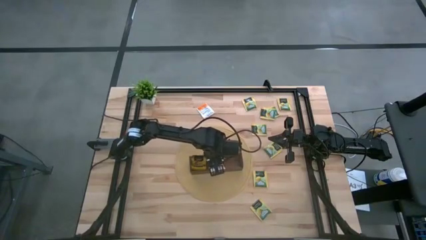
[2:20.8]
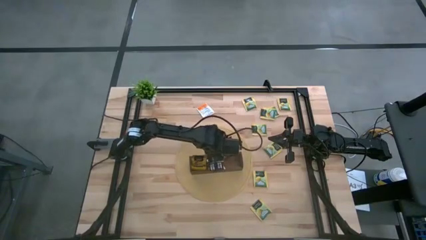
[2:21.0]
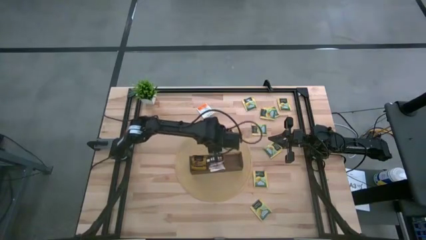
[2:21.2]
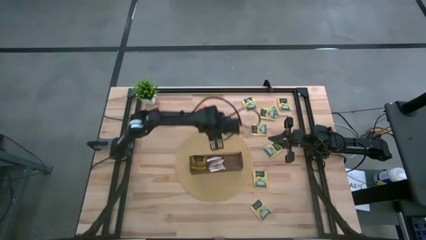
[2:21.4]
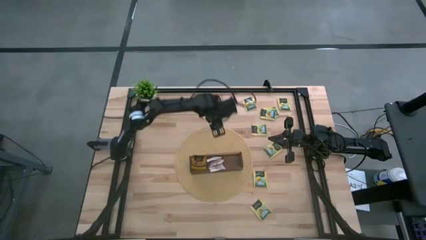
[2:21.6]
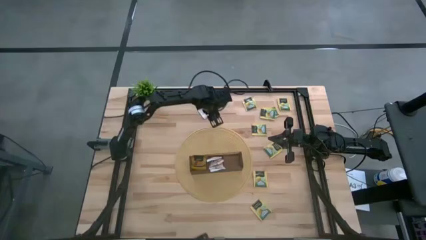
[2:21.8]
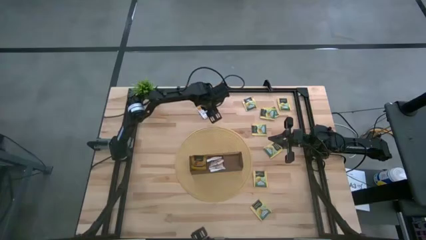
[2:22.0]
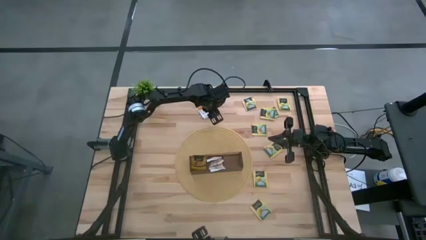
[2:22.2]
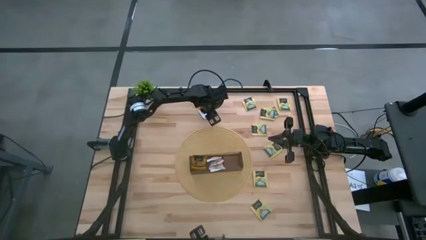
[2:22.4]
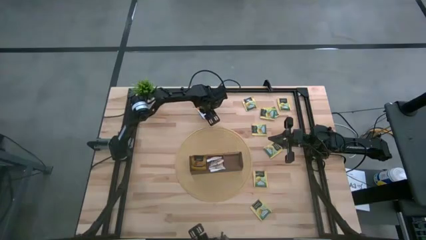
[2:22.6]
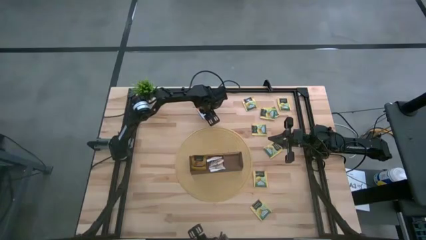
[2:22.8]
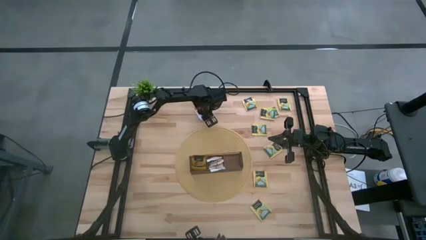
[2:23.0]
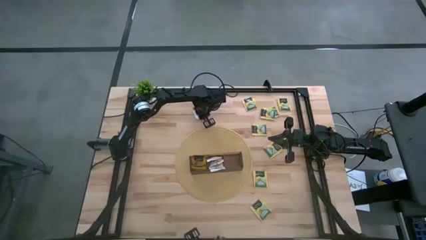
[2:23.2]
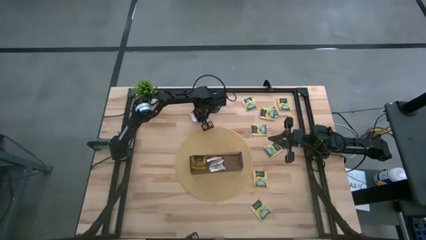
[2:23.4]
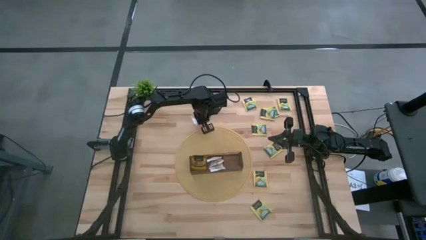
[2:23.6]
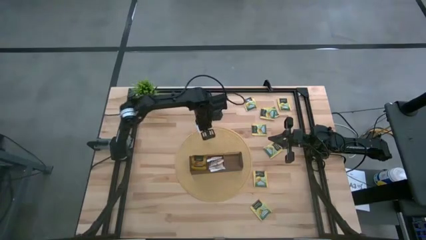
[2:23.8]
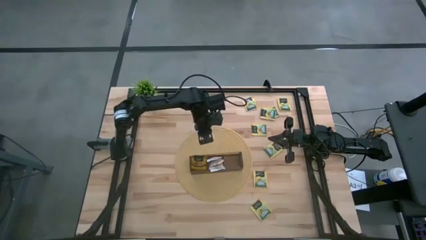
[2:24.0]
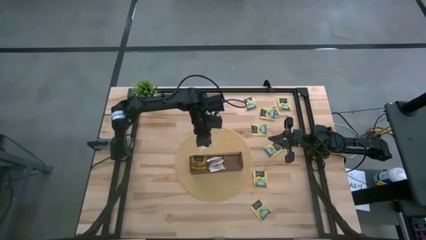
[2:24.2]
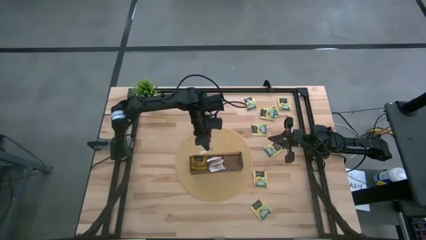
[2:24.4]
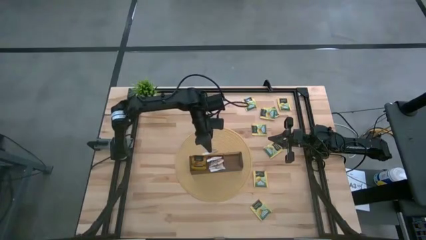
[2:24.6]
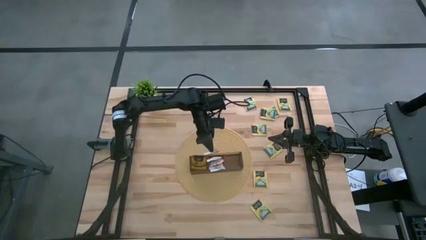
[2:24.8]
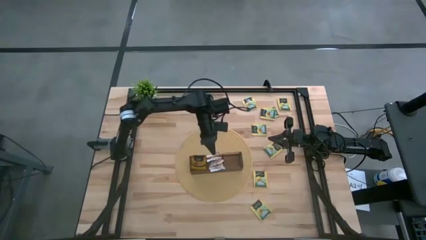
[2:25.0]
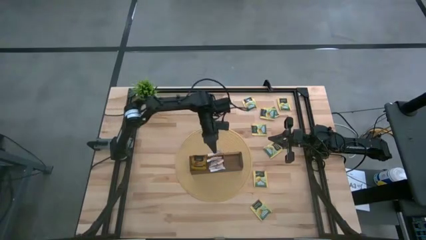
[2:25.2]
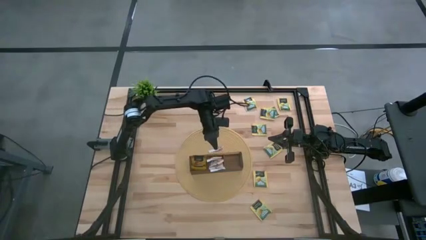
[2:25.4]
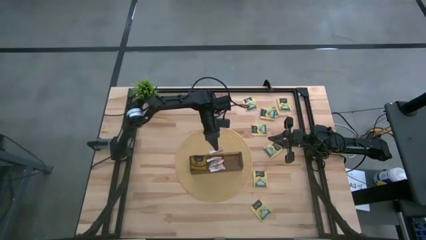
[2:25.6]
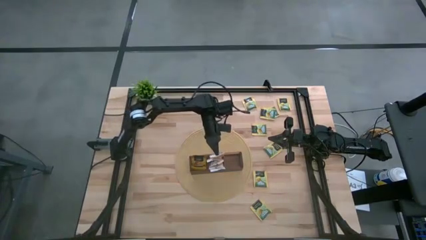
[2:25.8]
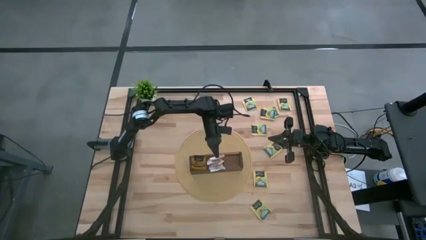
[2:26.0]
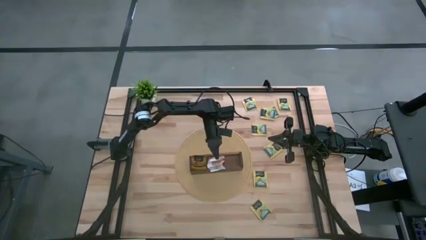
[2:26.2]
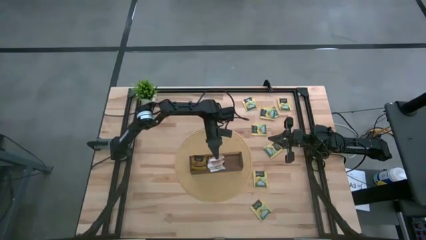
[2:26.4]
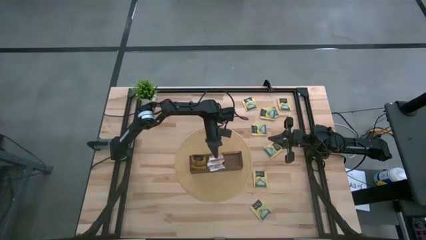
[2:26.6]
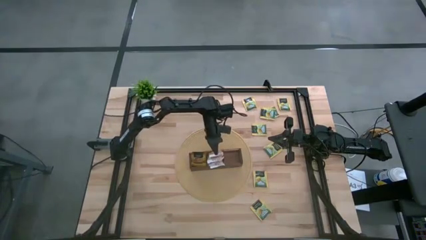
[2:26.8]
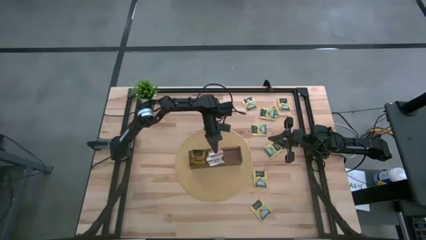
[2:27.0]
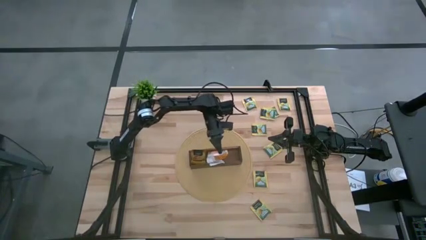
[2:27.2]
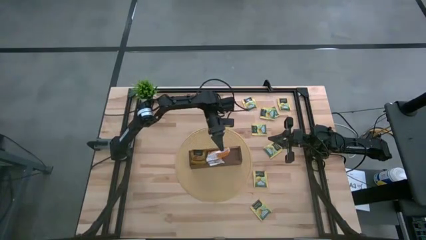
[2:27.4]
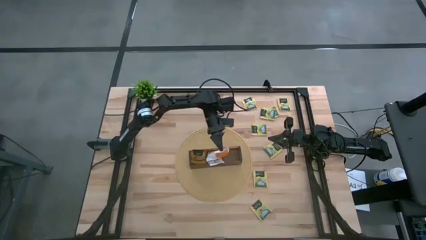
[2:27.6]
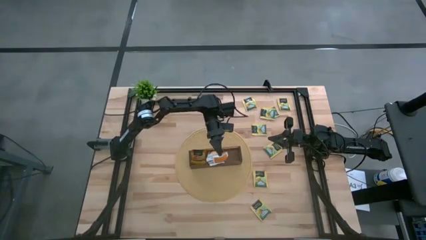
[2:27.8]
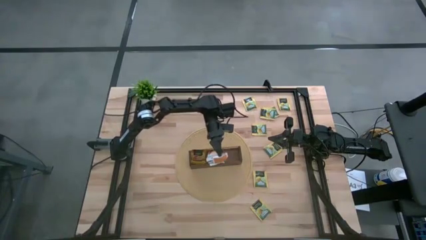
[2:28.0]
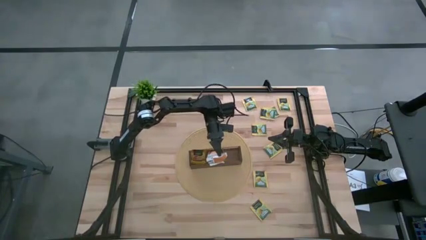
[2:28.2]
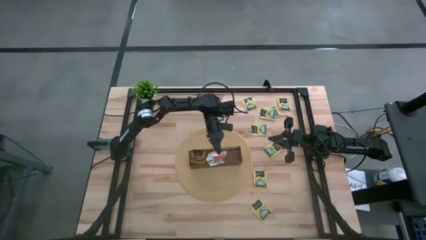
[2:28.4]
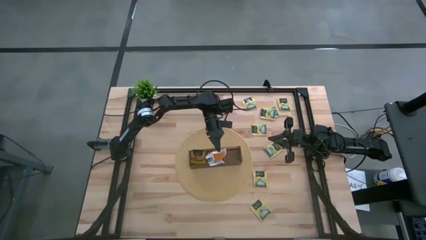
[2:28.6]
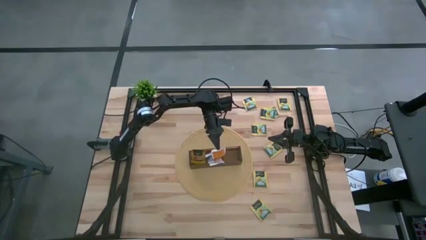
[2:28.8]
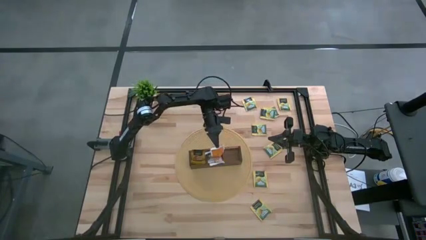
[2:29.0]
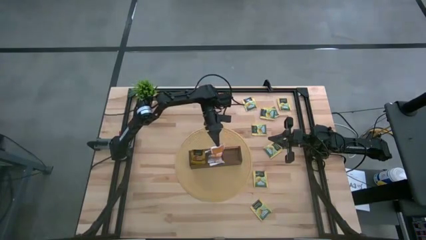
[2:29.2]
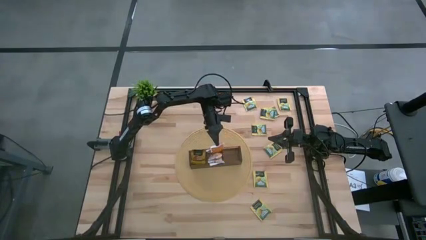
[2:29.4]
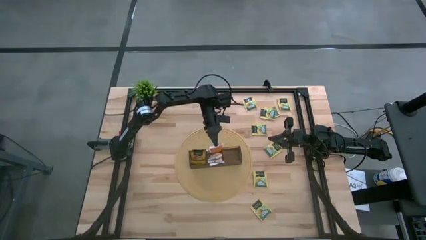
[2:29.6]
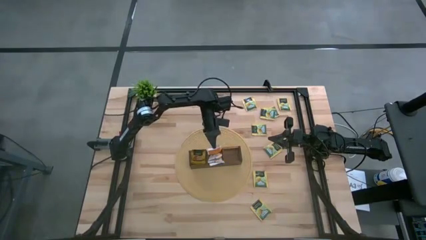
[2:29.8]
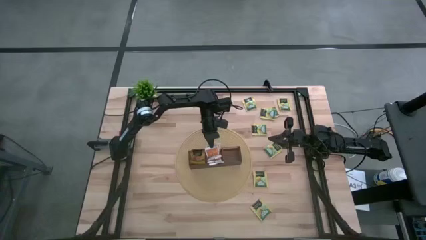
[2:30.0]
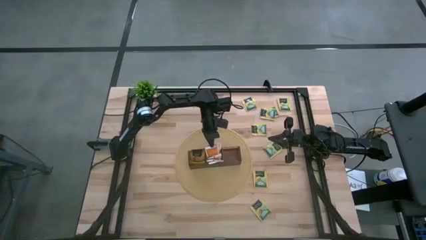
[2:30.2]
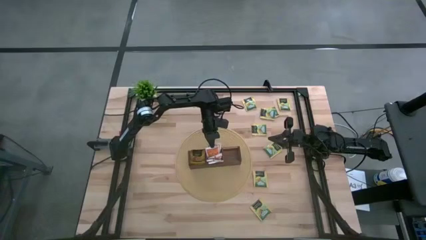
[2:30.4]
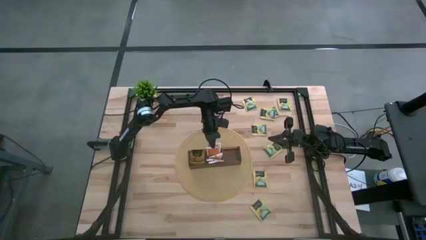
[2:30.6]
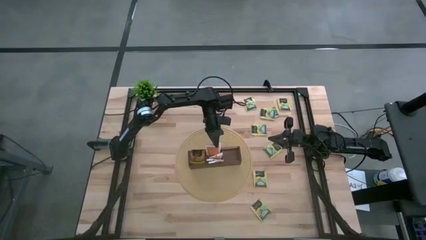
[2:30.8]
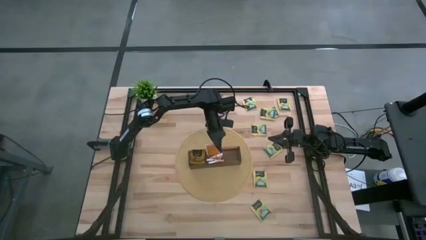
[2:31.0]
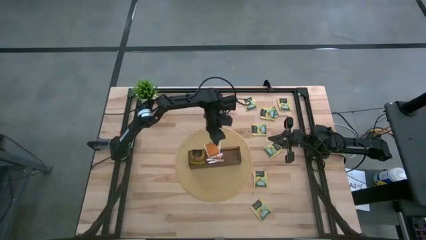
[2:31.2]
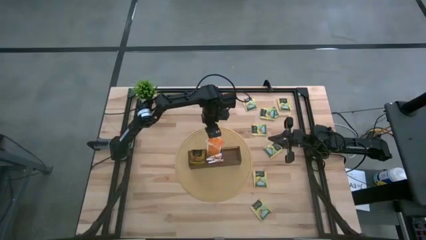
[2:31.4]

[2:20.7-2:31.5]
Task: Pick & Place Tea
Put the orange tea sachet into the mid section of the wooden organizer

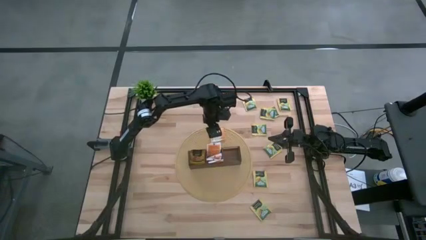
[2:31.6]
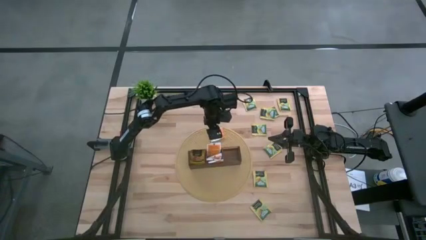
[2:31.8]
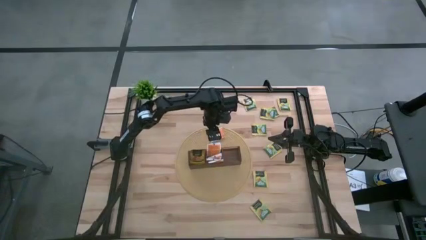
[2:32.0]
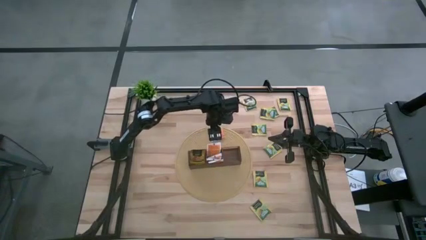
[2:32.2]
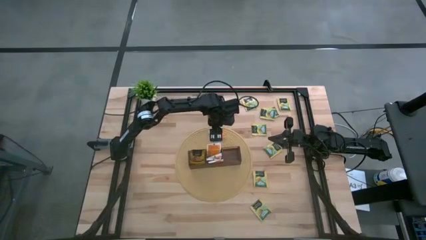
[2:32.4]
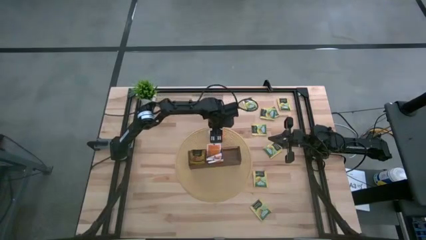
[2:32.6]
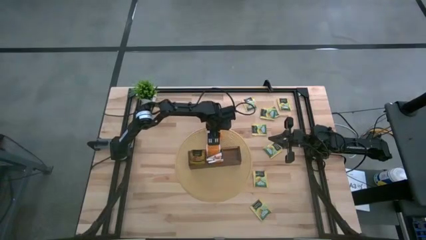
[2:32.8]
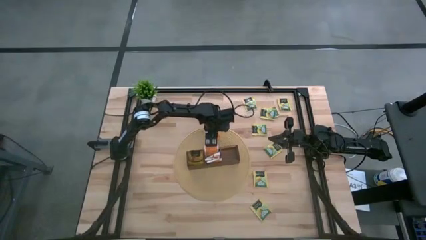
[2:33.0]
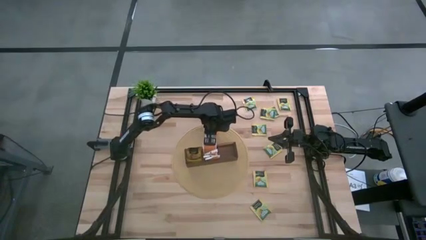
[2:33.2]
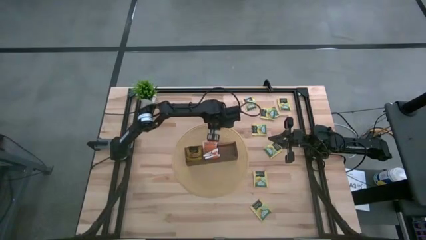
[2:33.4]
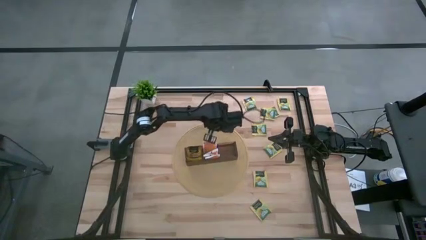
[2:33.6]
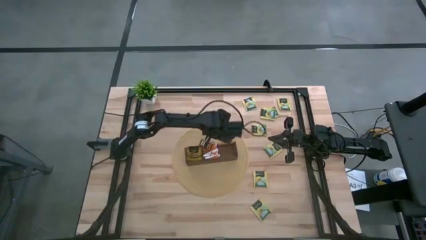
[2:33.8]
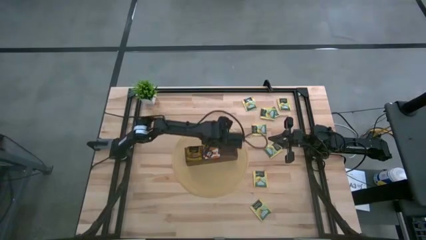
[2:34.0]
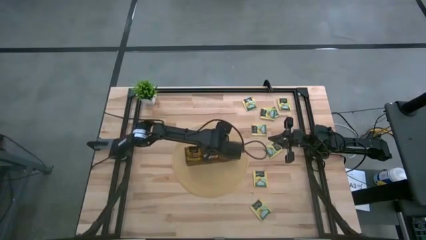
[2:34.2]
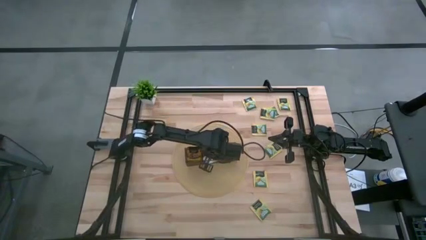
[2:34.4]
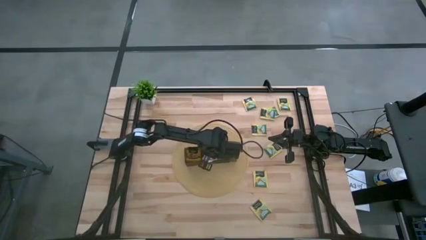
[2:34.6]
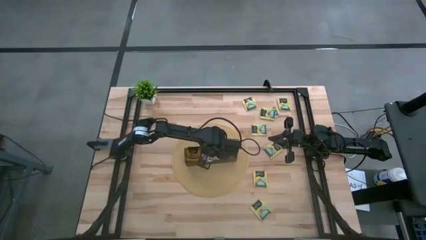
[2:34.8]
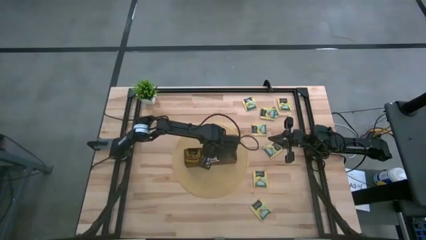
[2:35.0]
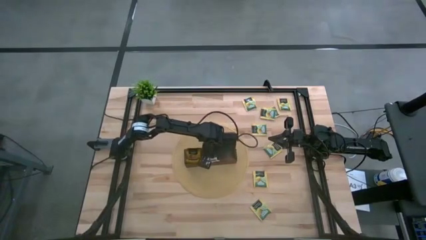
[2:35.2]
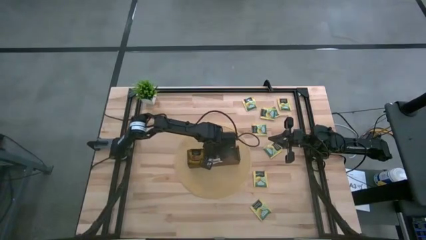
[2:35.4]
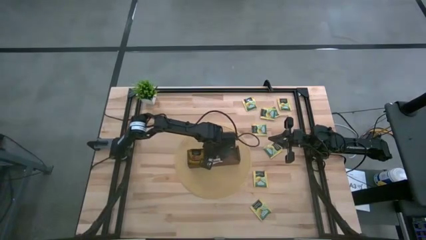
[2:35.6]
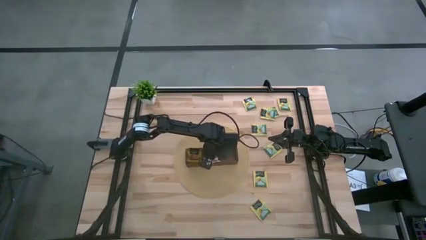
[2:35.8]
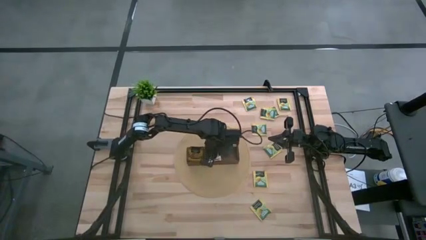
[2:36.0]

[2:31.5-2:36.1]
Put the orange tea sachet into the middle section of the wooden organizer

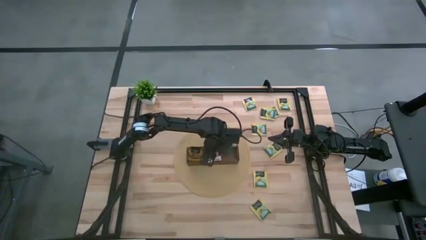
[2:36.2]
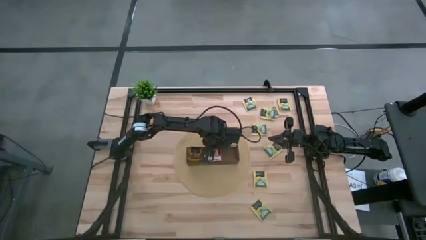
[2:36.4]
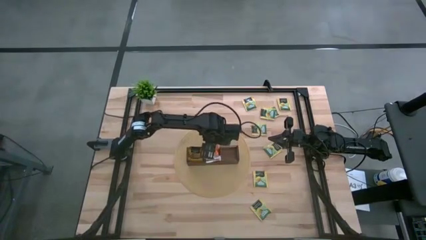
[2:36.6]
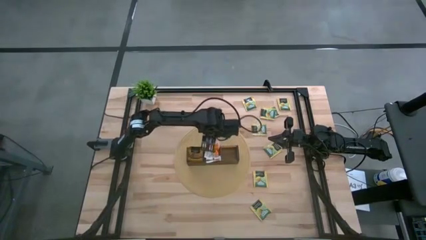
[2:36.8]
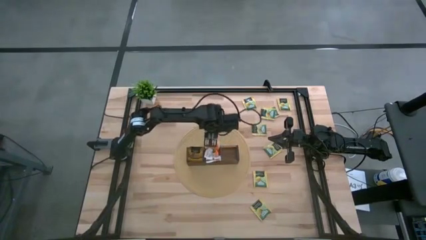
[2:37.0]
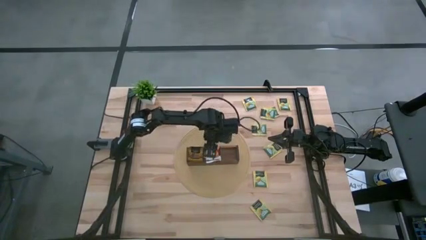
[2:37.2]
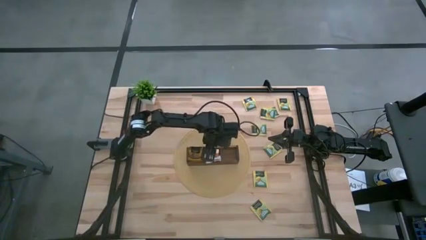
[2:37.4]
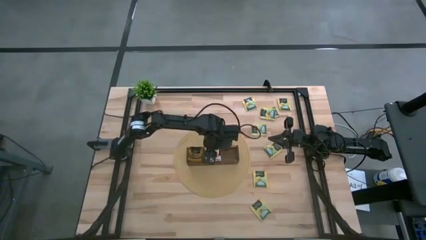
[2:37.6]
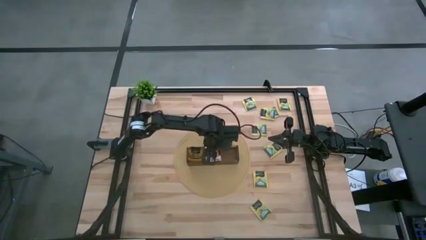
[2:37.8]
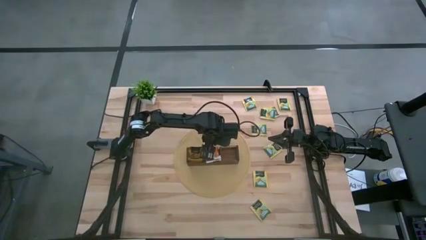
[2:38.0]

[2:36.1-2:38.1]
Adjust the orange tea sachet in the wooden organizer
